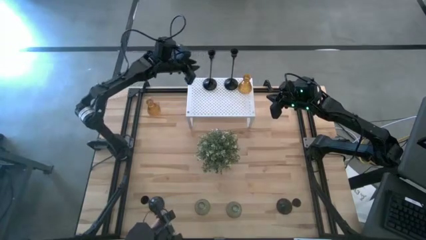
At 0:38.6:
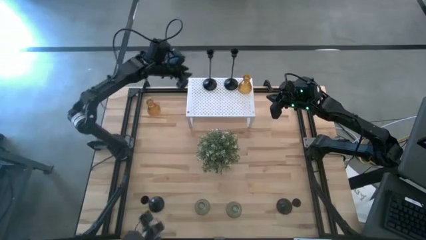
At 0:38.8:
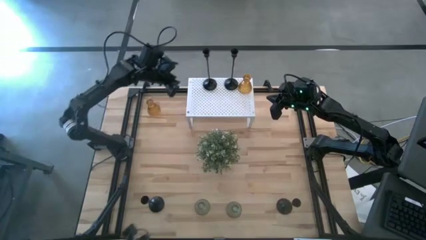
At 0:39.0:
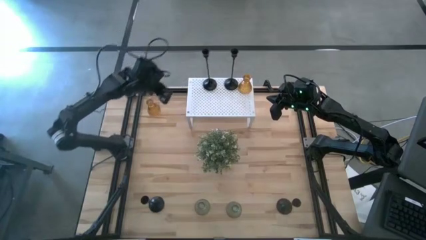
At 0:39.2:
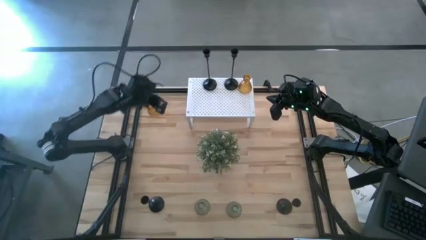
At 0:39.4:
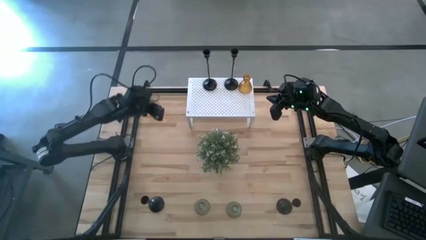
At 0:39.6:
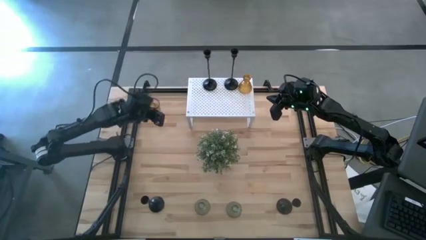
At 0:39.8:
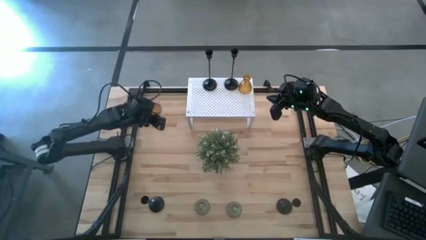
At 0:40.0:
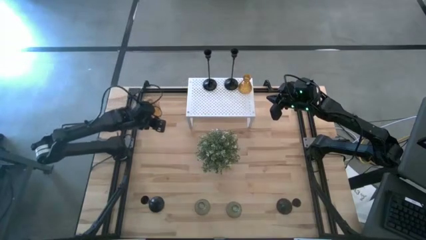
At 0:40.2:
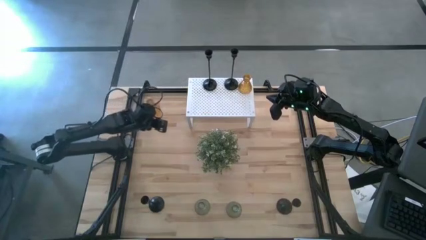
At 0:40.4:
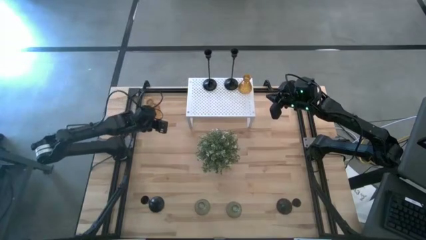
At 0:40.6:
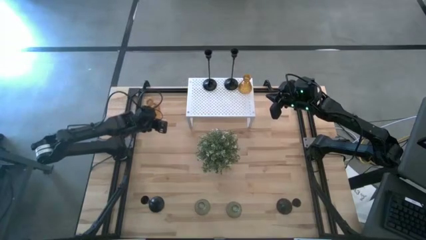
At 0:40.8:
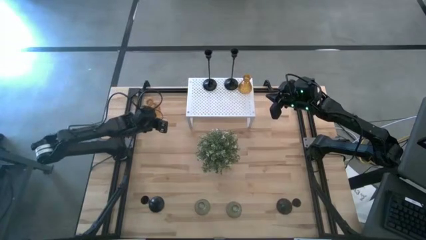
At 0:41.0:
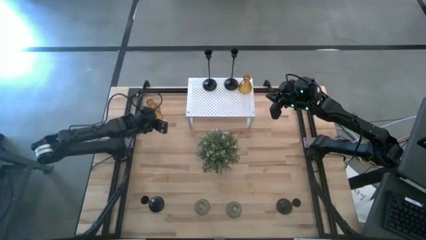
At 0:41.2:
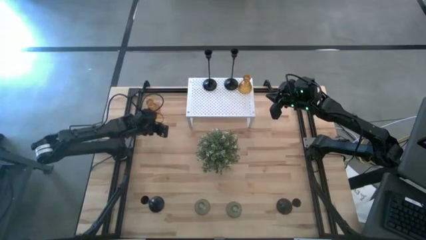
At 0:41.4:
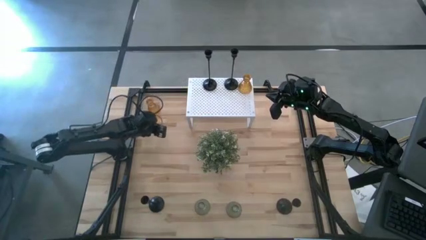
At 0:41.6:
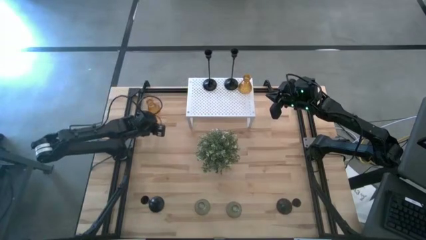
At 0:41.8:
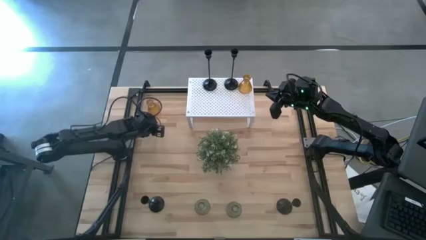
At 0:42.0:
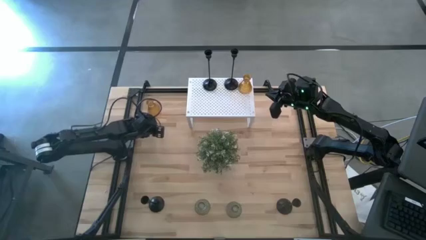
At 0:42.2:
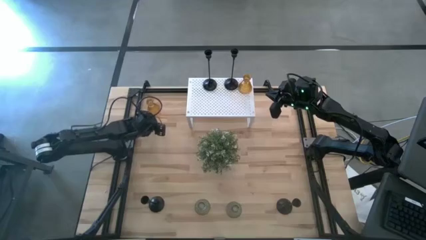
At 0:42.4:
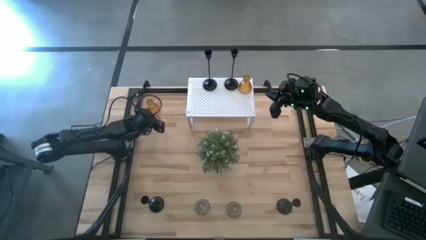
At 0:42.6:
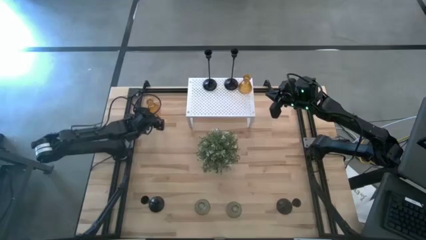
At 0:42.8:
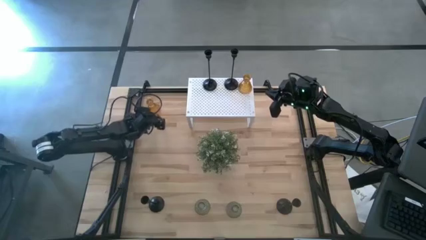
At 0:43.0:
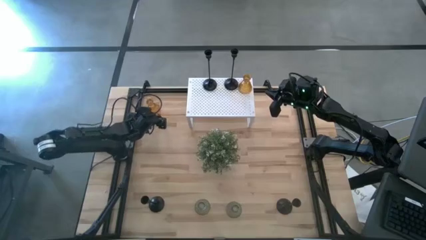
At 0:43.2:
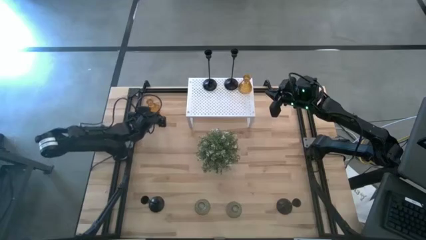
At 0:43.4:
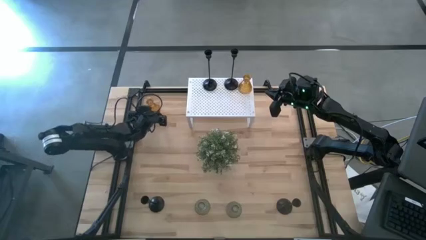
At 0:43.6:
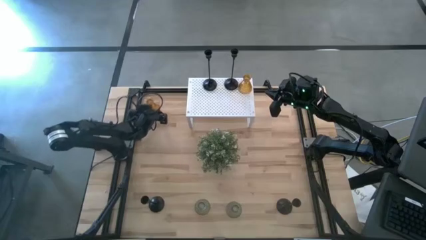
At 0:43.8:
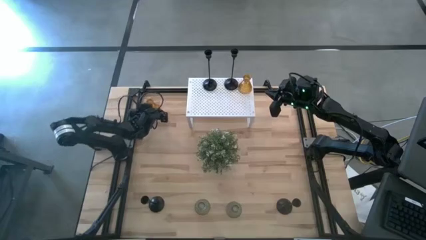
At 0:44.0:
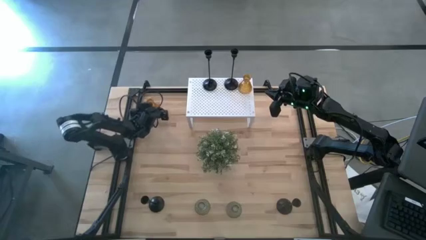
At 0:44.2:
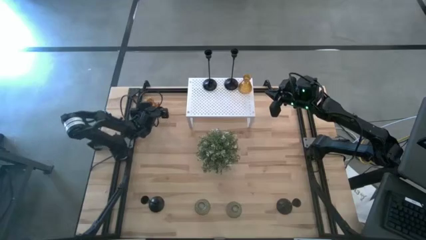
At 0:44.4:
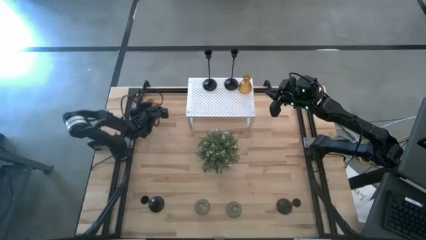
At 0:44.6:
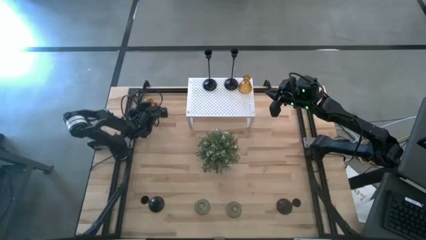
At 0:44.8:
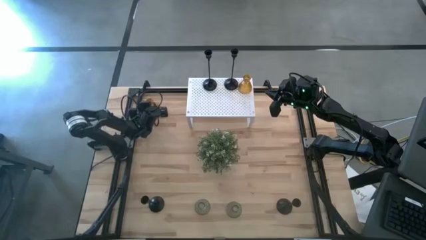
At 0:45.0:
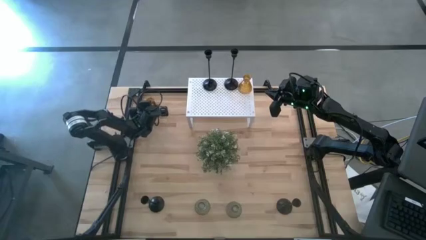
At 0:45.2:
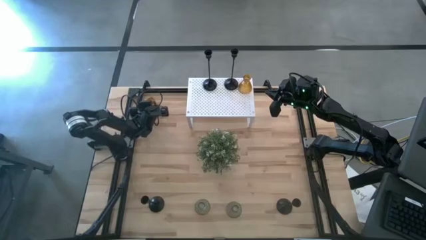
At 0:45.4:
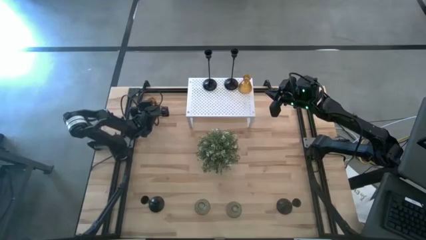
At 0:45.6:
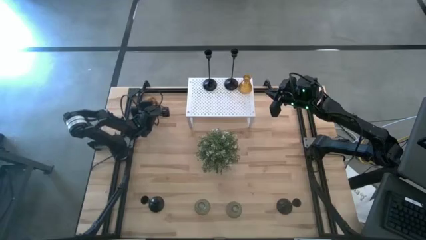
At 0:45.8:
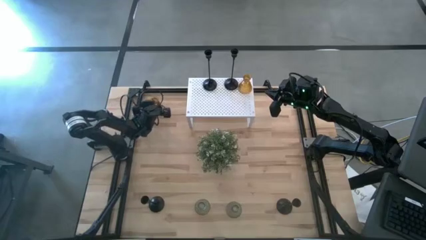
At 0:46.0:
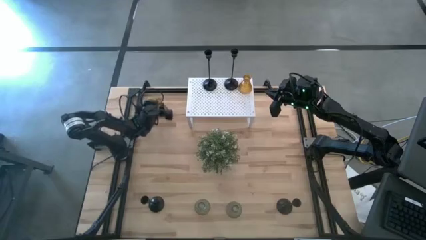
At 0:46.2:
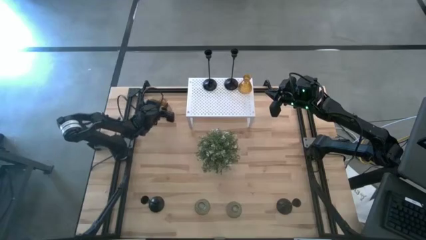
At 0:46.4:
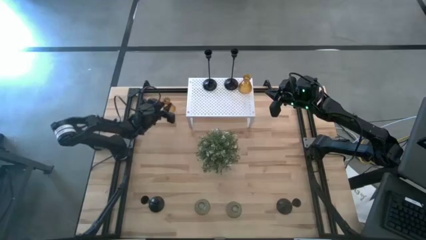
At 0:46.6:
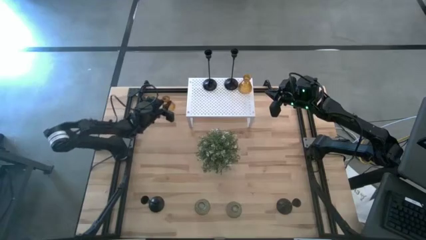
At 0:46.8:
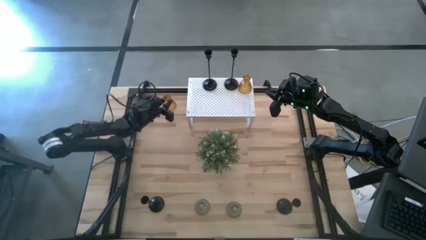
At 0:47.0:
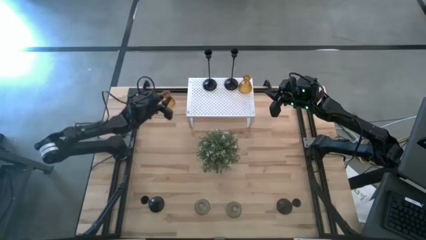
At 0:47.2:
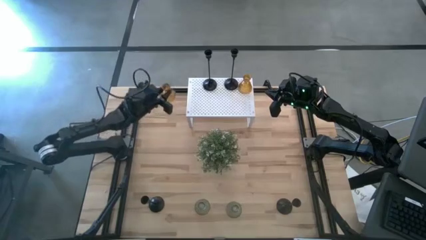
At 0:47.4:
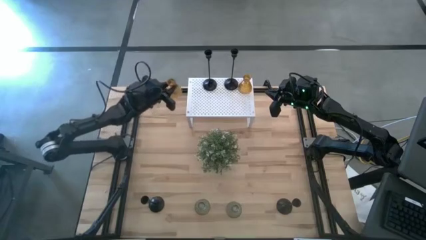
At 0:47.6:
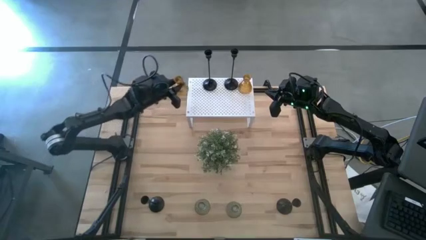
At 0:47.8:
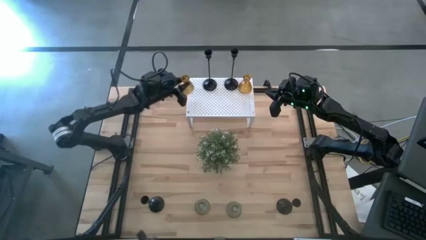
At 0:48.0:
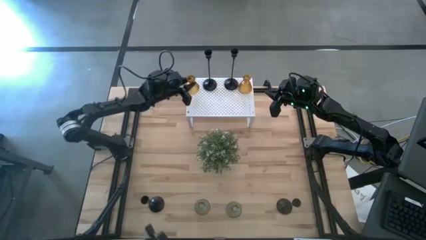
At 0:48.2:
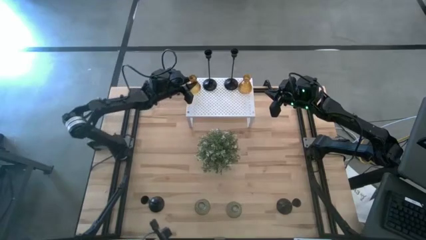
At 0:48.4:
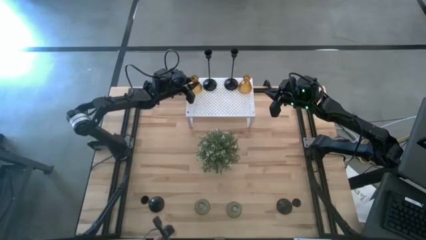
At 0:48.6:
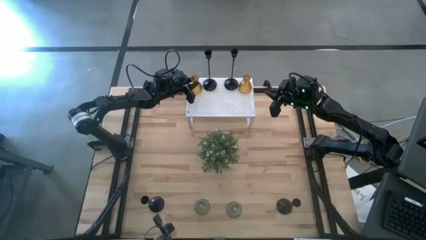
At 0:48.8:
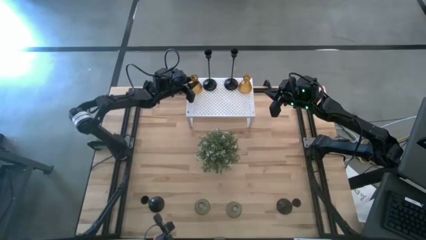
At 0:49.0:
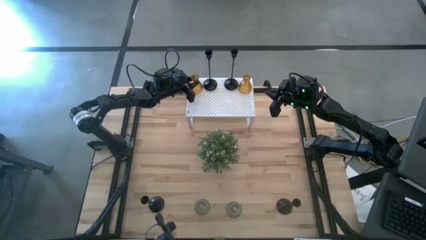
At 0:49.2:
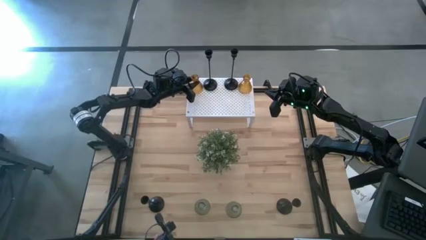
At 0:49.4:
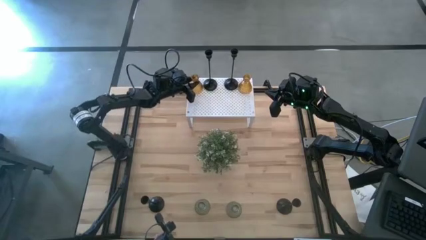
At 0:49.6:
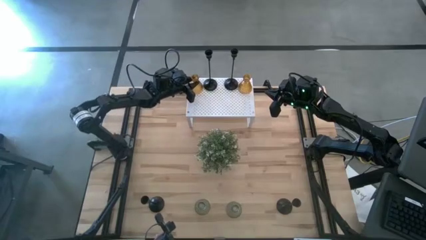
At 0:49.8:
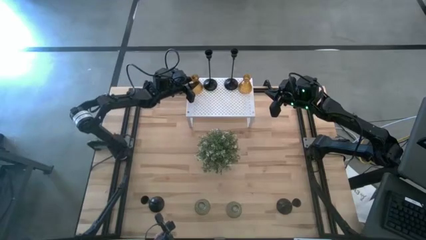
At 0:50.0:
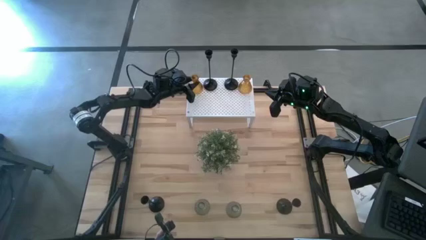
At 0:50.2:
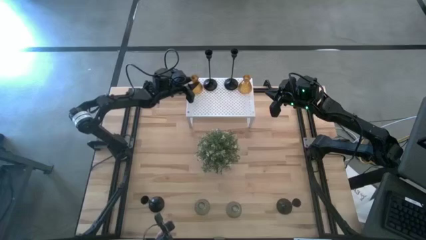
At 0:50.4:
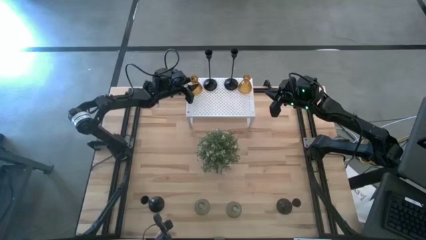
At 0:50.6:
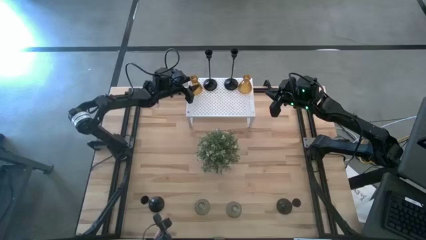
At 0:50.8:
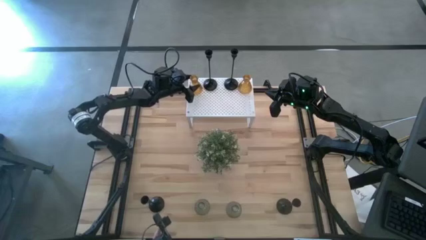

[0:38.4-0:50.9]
Task: Pick & Place candle stick holders
Put the orange glass candle holder on the shelf
